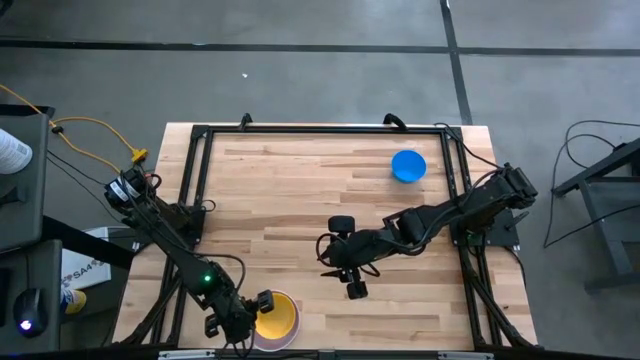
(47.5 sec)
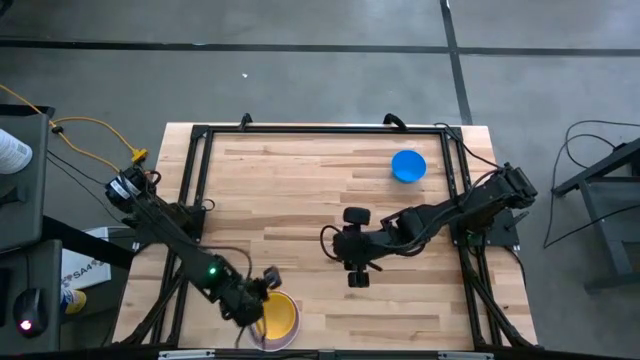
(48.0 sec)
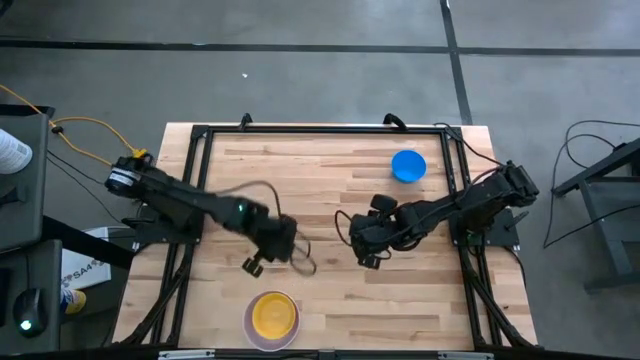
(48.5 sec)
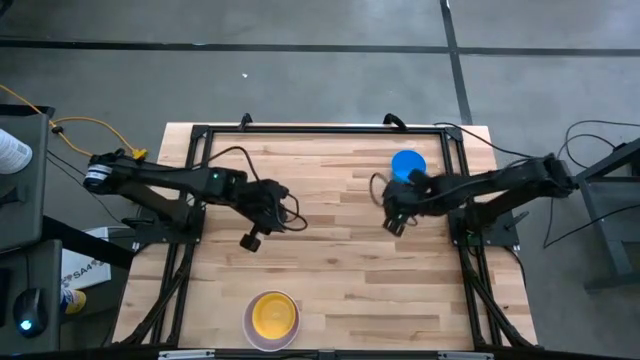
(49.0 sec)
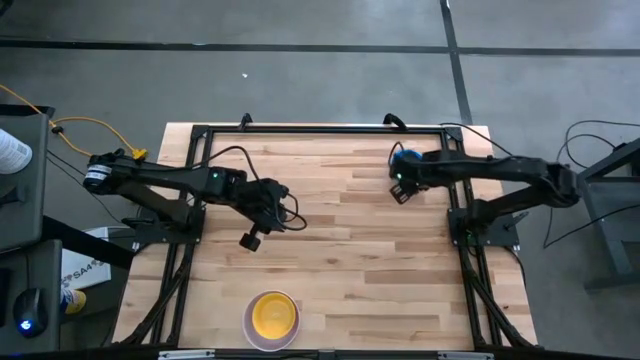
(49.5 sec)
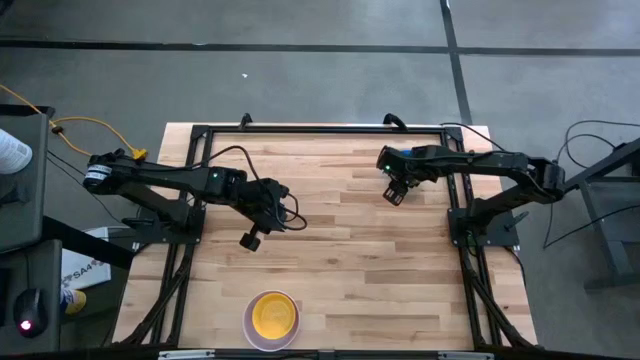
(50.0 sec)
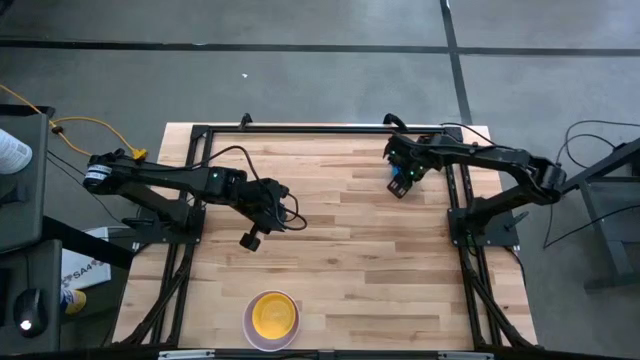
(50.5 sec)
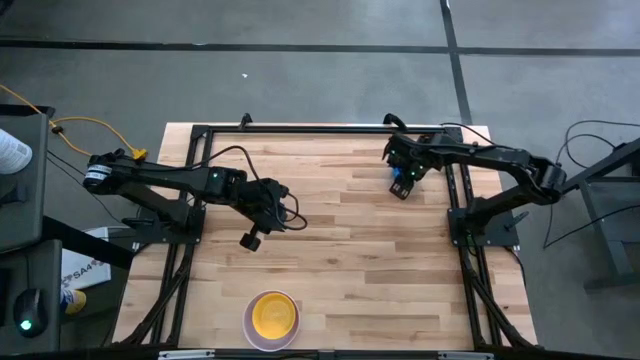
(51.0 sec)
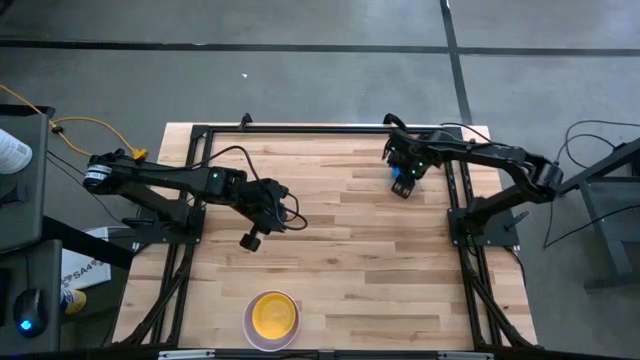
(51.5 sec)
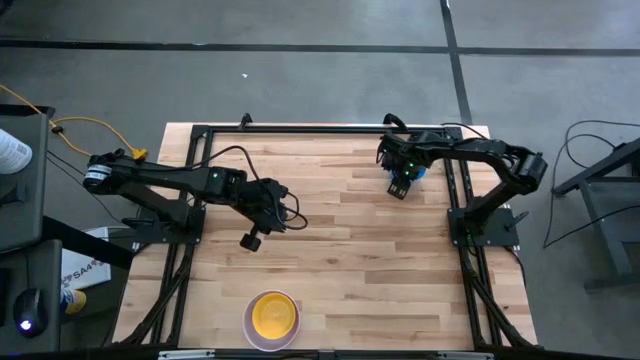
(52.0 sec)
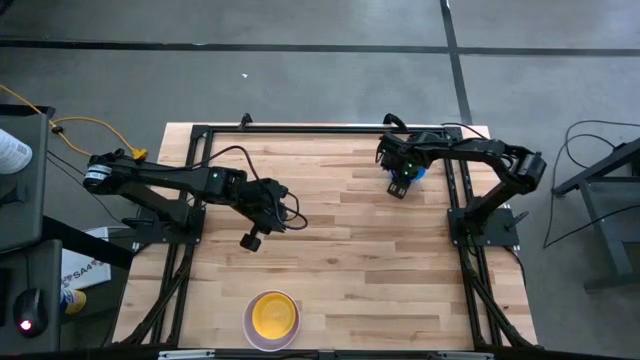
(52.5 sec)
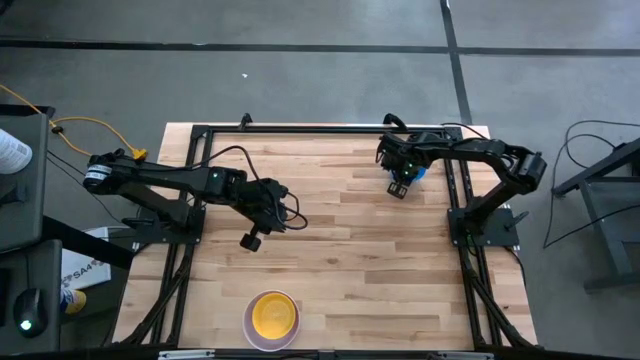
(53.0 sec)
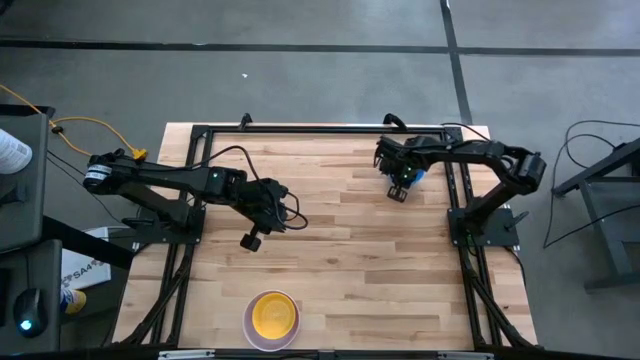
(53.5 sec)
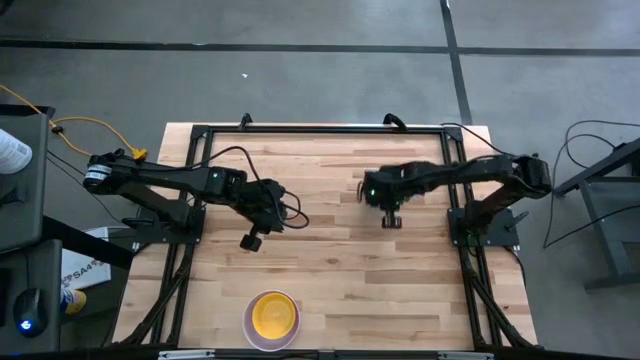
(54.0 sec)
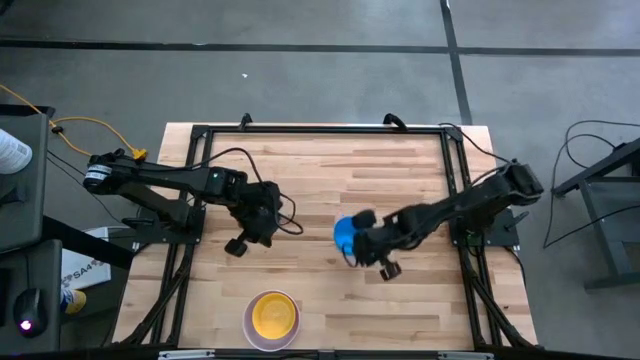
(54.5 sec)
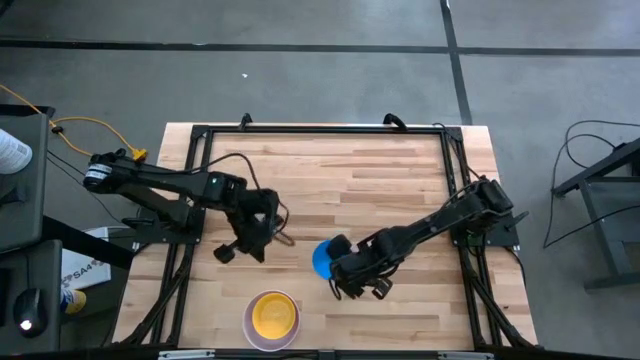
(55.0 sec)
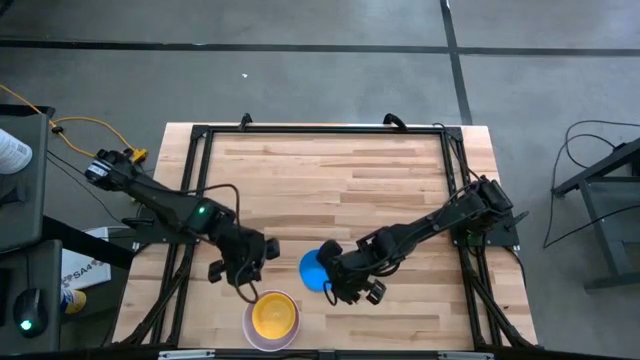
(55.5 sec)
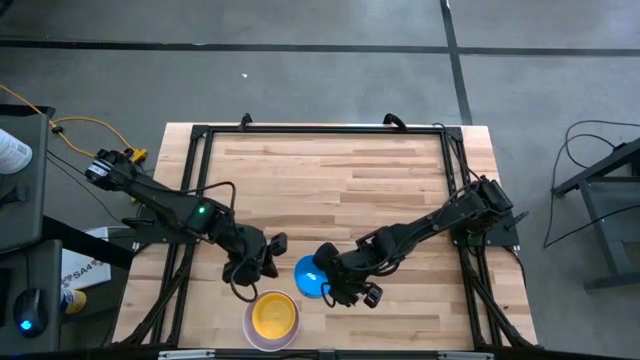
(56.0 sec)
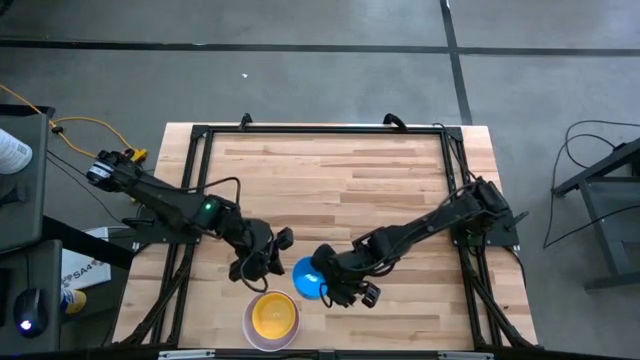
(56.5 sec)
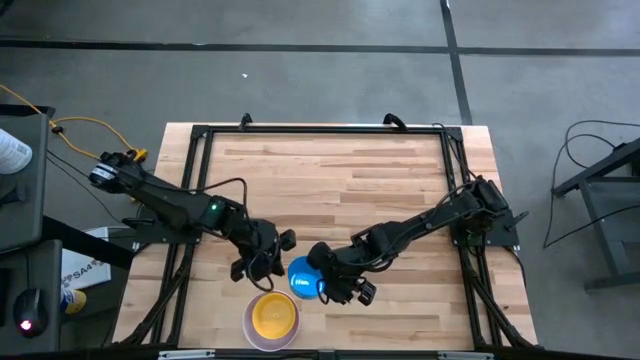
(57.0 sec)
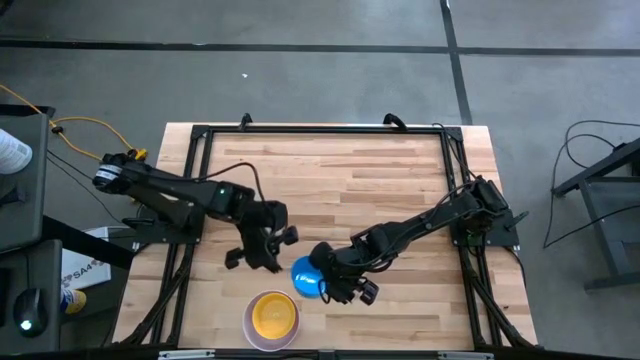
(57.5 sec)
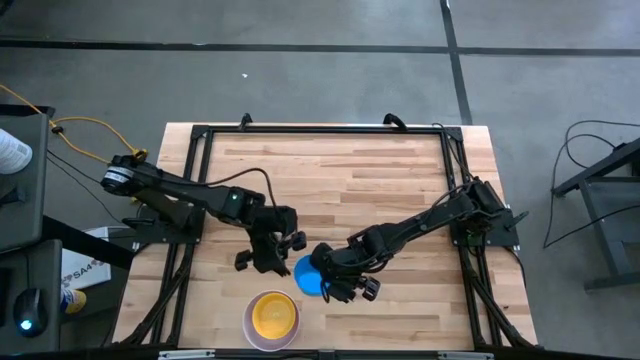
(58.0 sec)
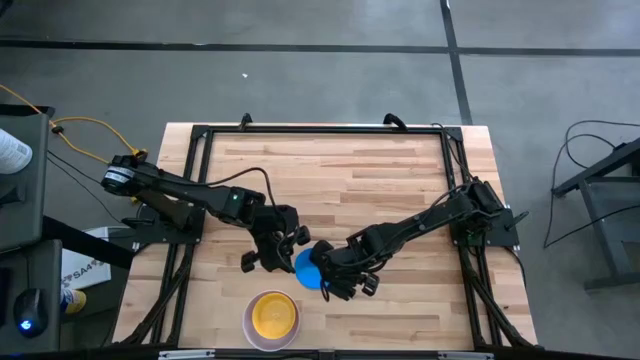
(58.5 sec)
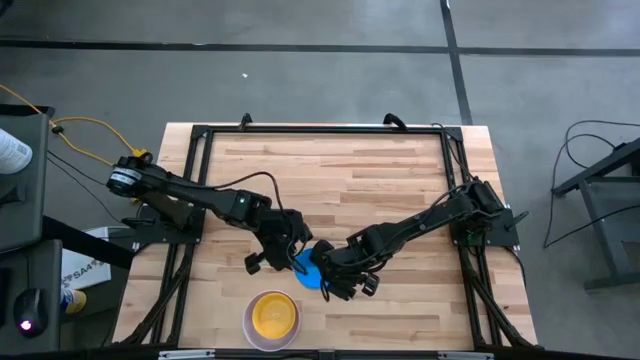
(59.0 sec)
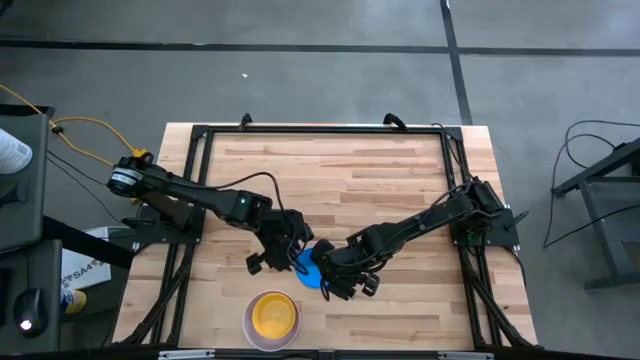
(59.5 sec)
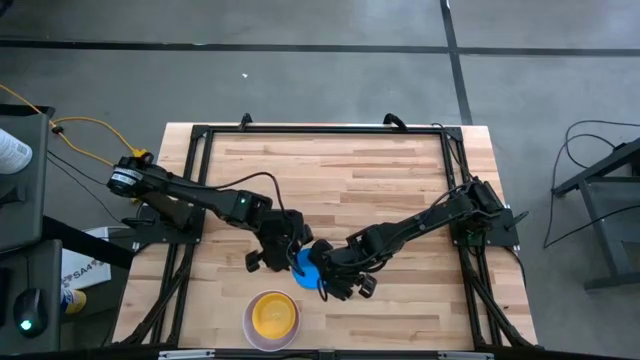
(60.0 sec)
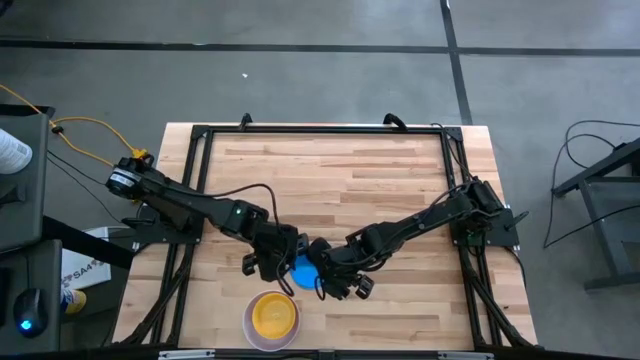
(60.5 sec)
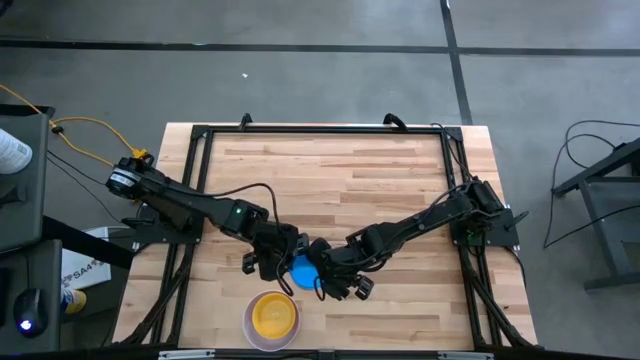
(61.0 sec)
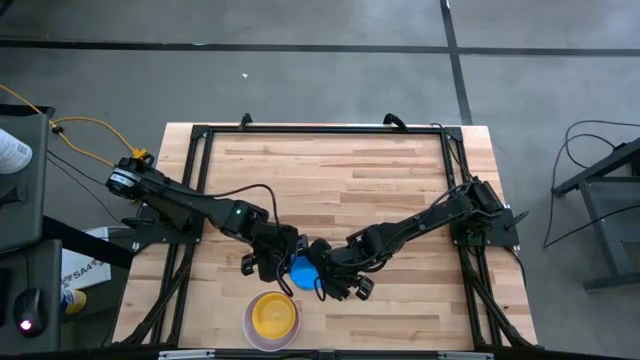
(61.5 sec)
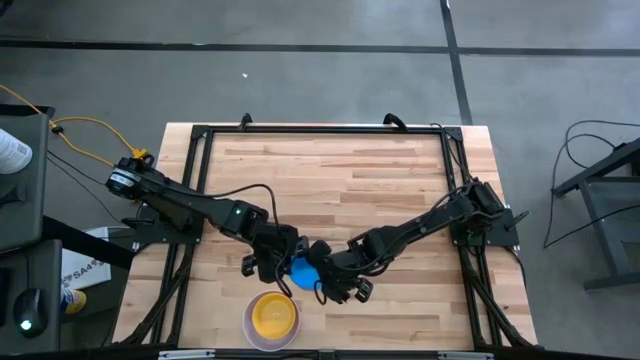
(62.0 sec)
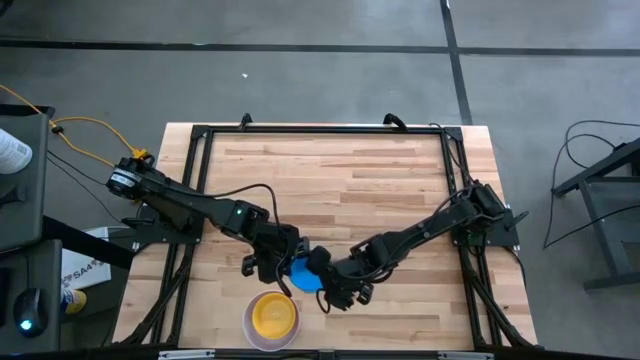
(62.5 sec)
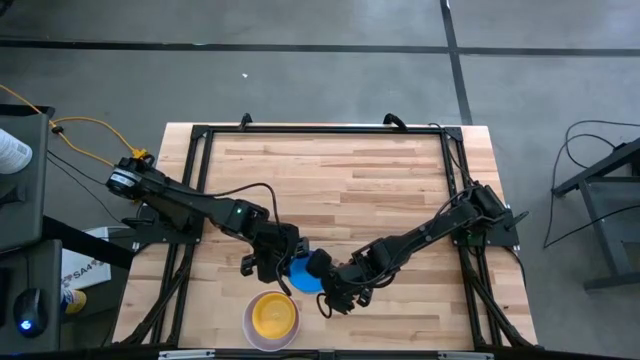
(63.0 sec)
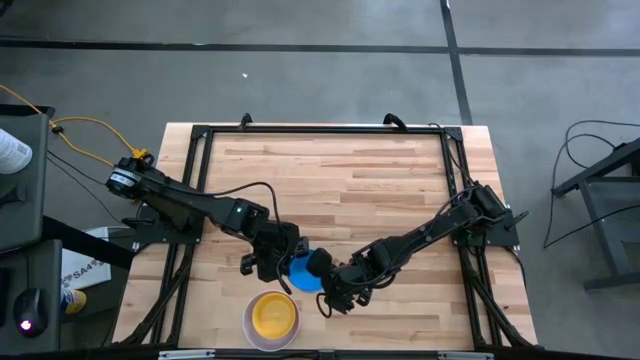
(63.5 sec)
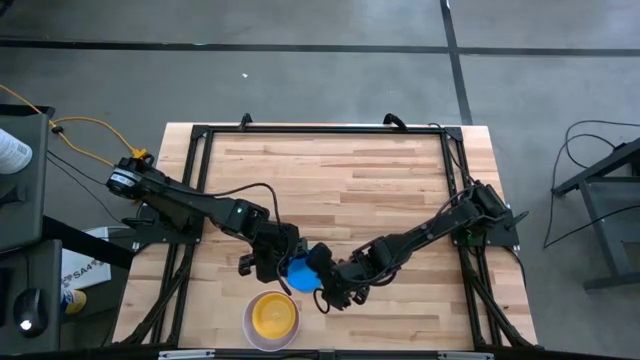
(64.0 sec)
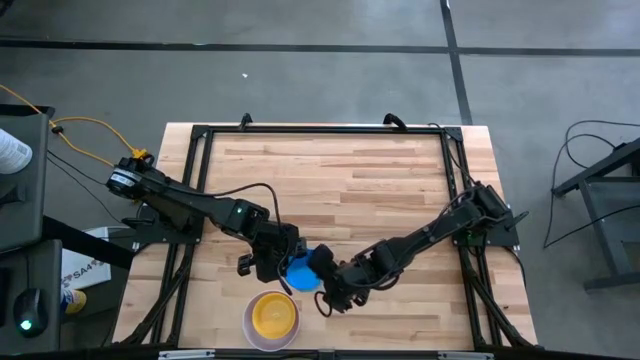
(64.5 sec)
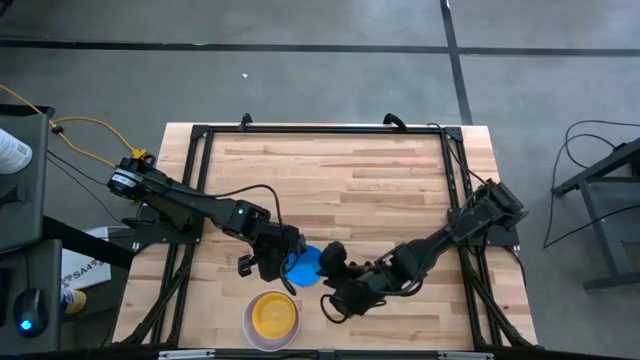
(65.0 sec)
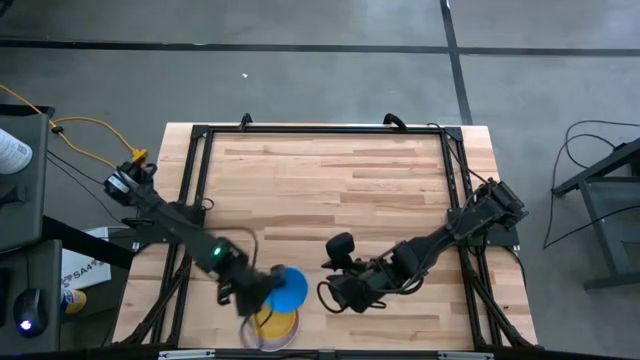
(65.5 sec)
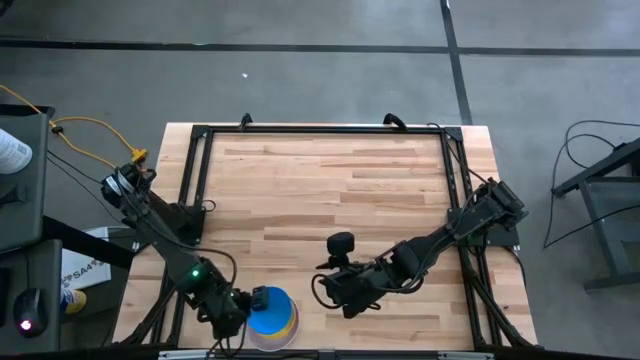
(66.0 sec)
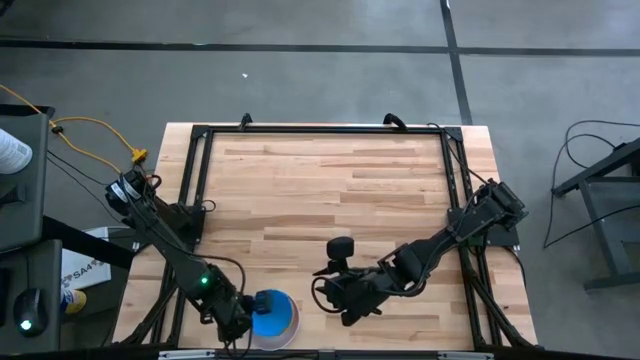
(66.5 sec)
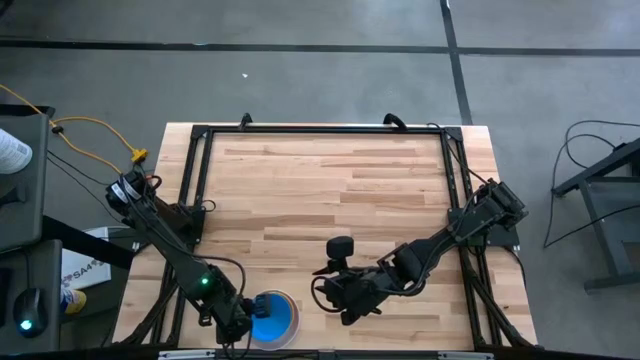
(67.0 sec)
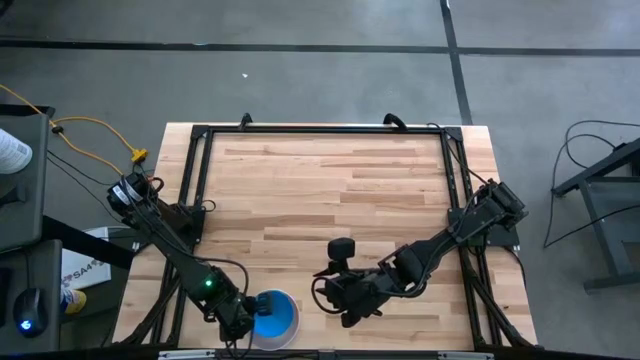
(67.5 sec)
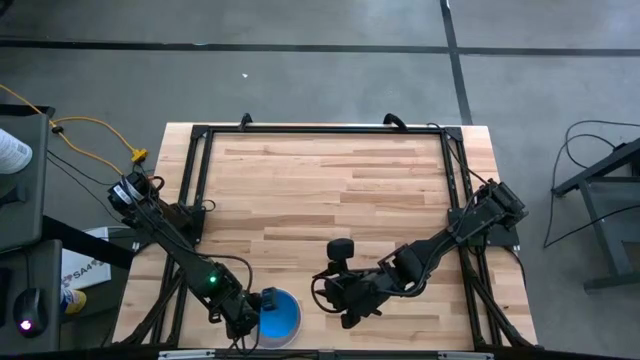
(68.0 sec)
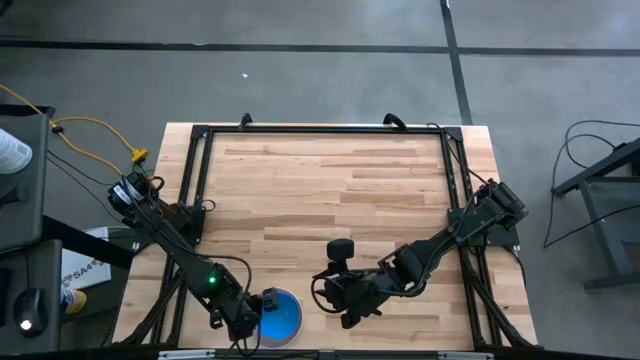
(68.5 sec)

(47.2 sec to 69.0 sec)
Stack the blue bowl on top of the yellow bowl
